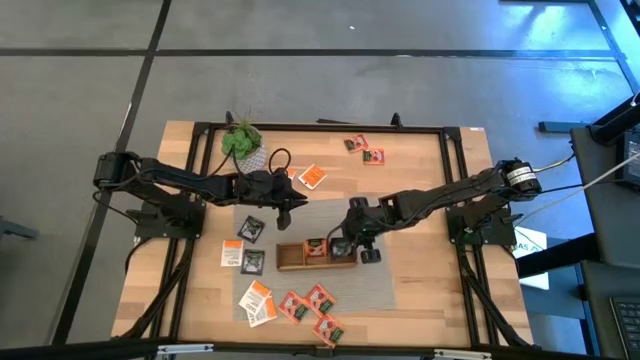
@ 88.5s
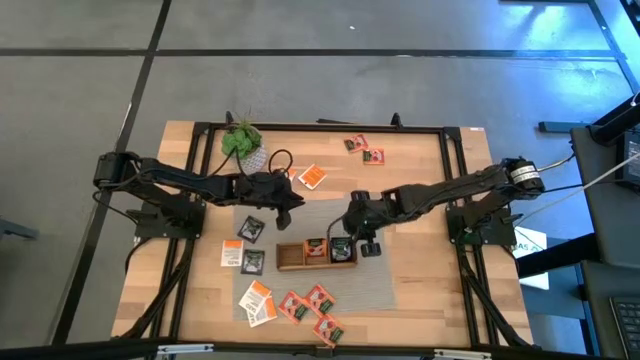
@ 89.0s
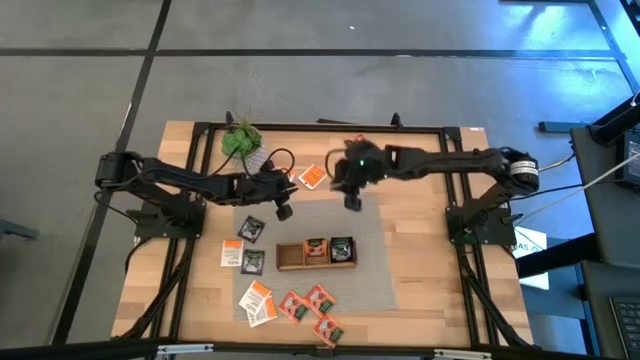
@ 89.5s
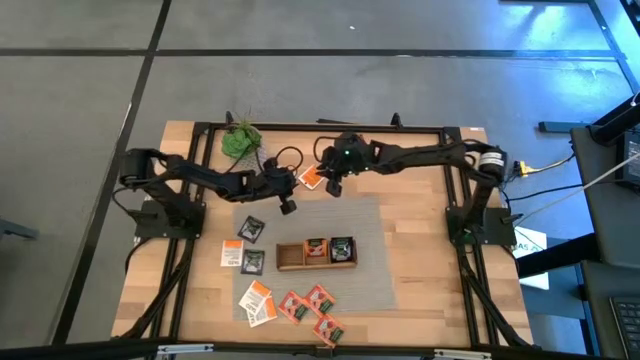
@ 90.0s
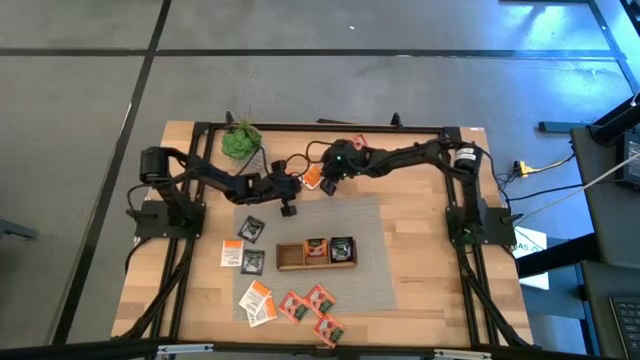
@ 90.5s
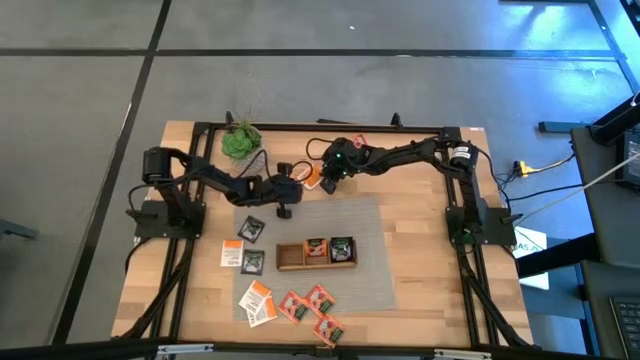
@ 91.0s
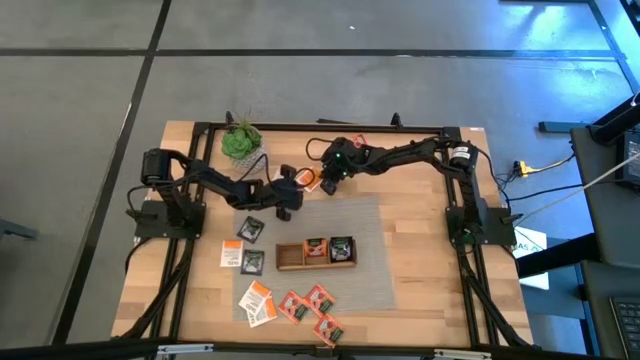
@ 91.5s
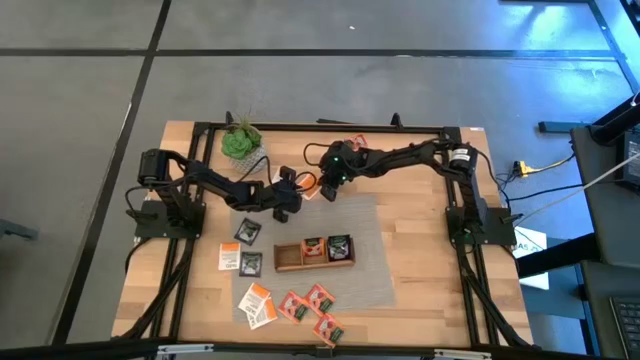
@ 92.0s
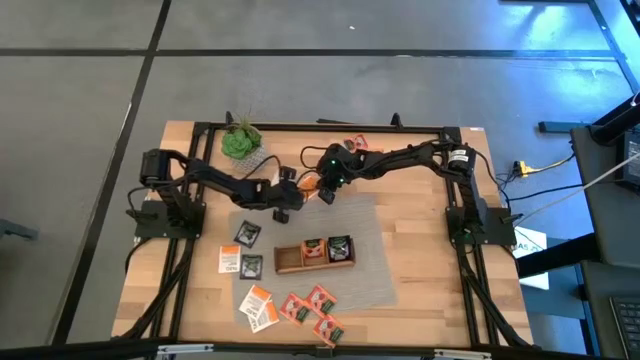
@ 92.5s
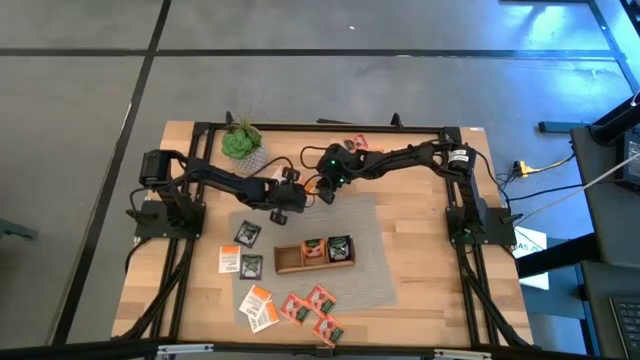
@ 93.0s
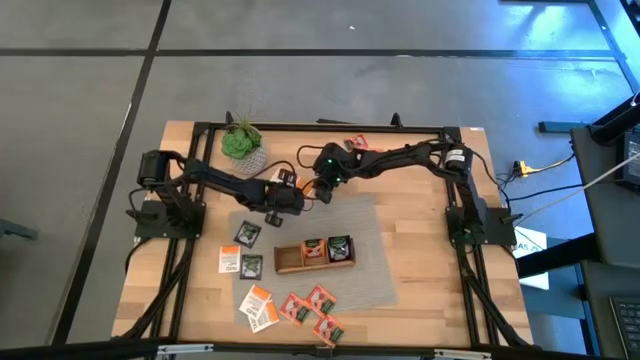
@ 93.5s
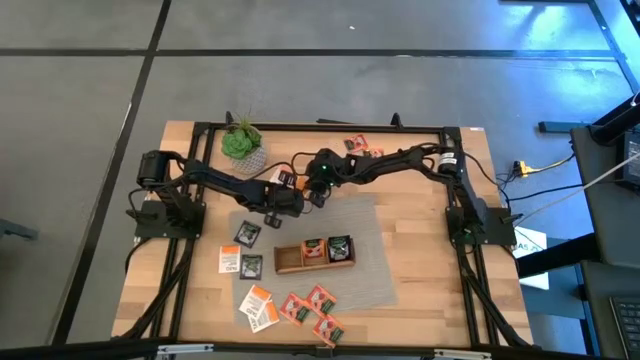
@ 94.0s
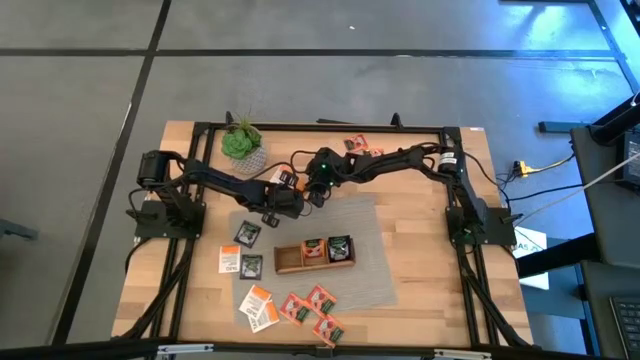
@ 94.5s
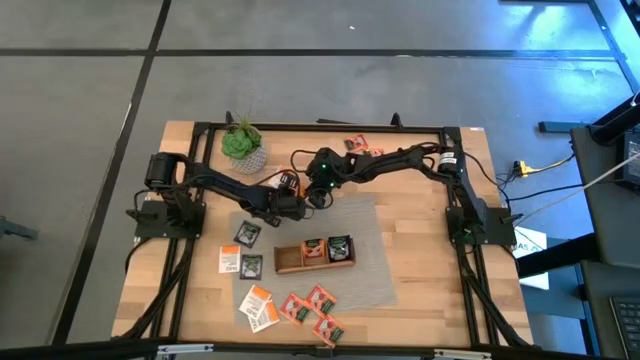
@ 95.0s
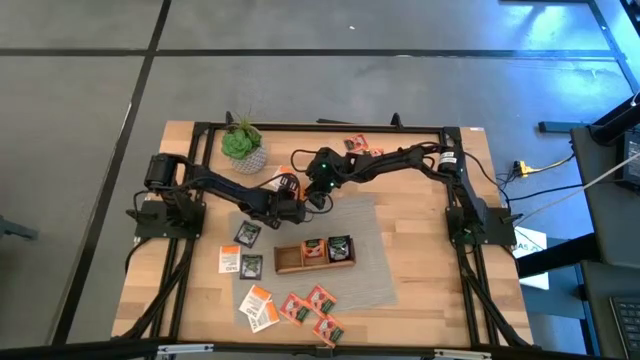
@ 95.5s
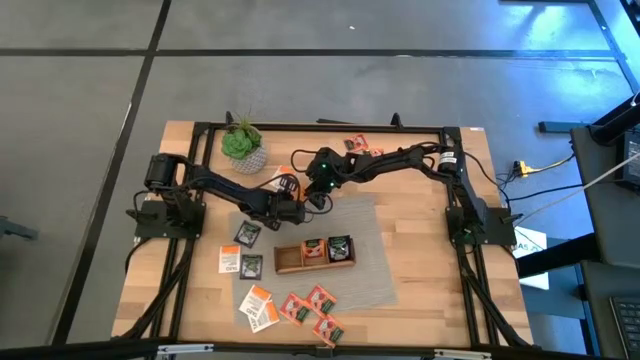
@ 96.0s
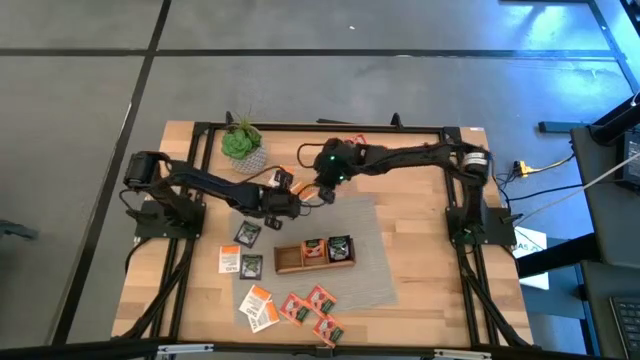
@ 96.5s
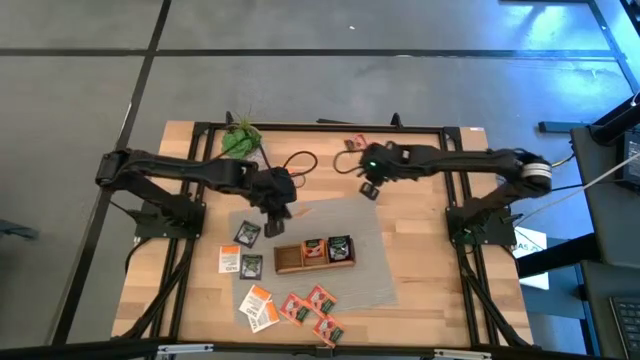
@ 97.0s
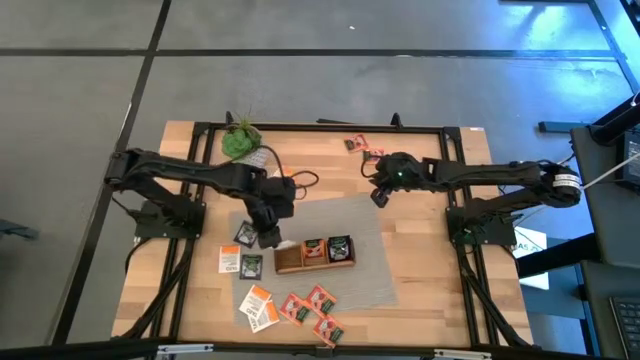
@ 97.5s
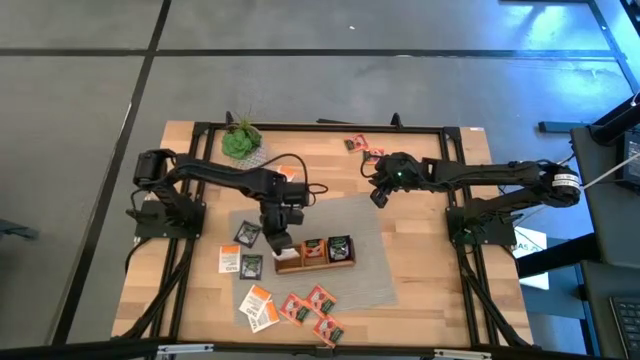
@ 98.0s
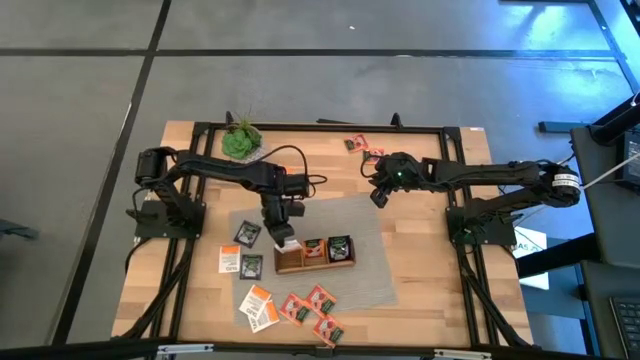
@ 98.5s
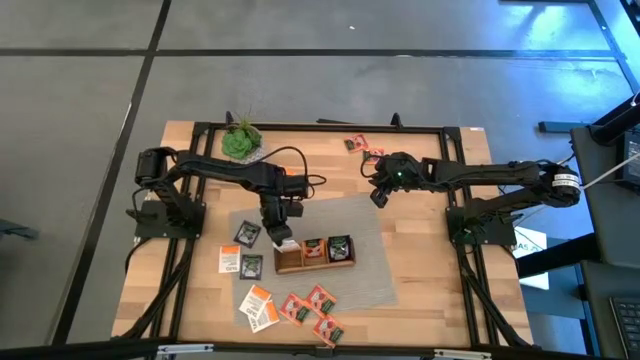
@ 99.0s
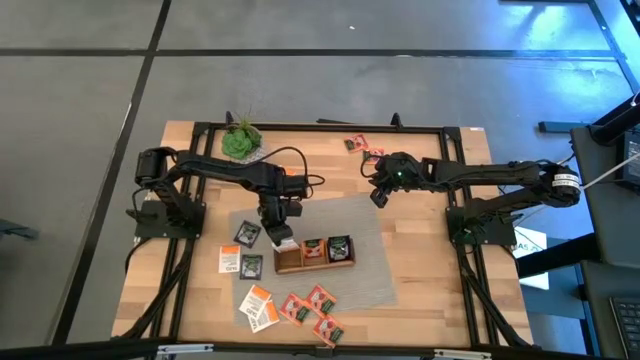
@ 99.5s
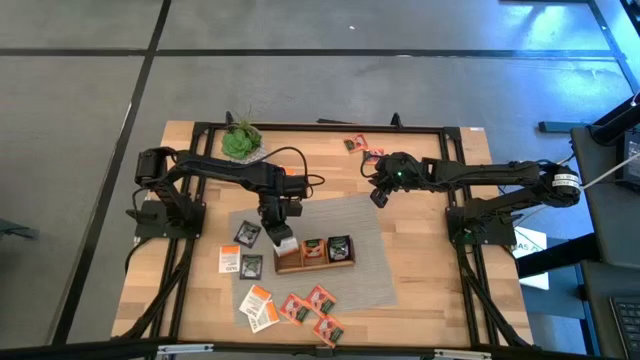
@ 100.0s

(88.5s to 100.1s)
Task: Pick & Place Tea
Put the white tea bag into the left section of the wooden organizer

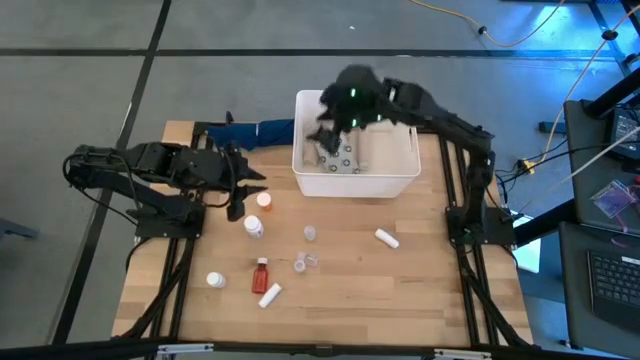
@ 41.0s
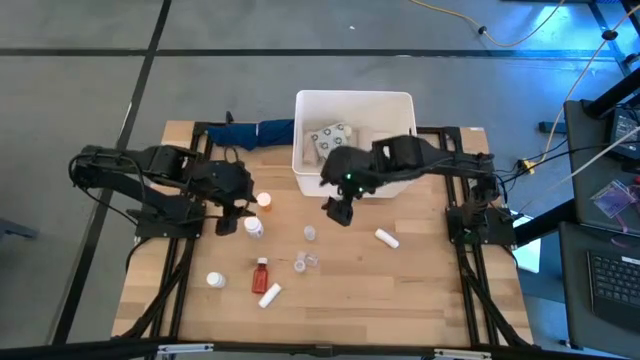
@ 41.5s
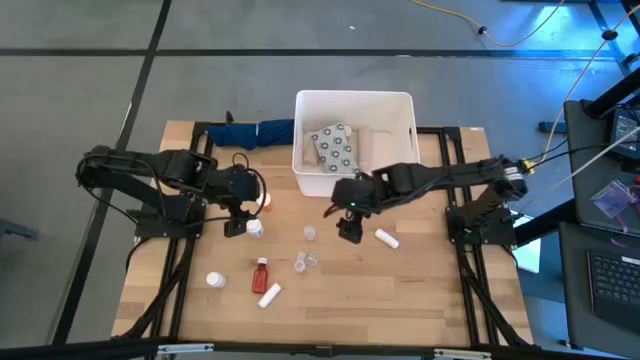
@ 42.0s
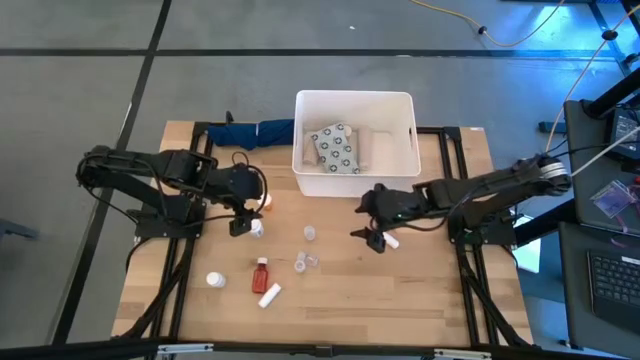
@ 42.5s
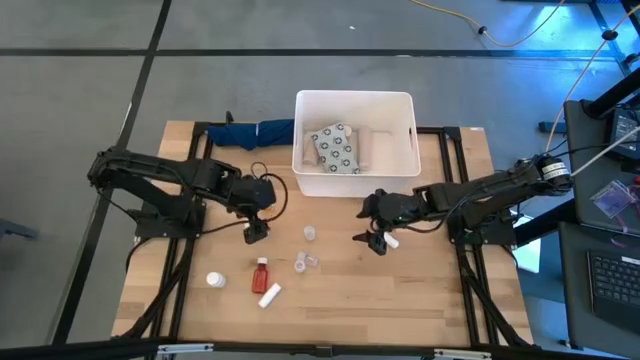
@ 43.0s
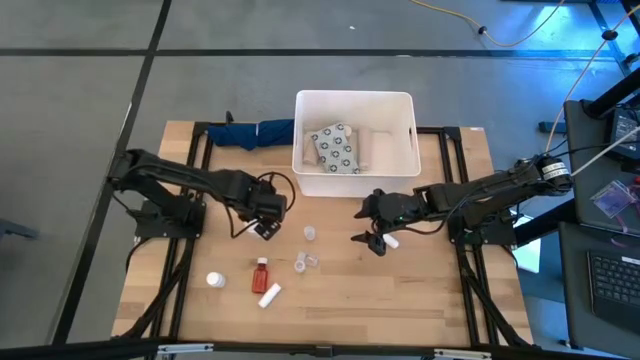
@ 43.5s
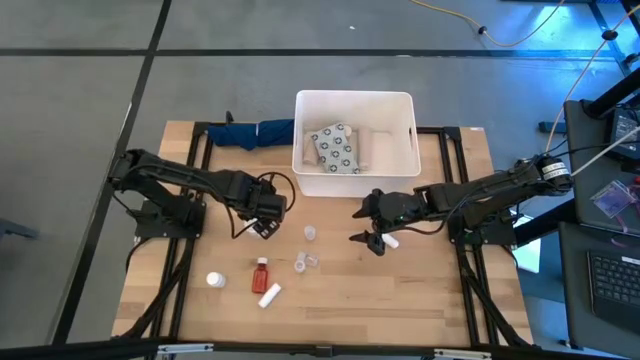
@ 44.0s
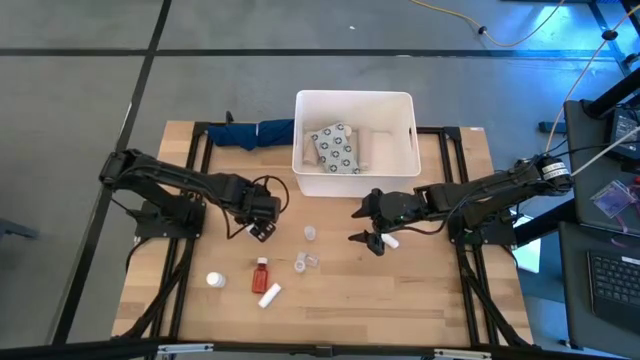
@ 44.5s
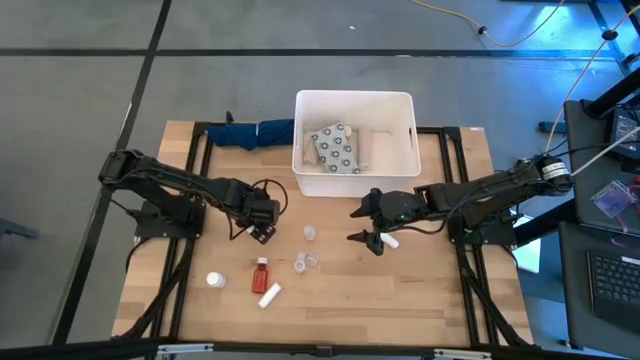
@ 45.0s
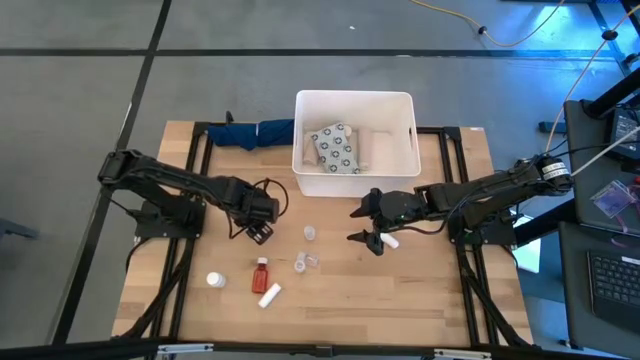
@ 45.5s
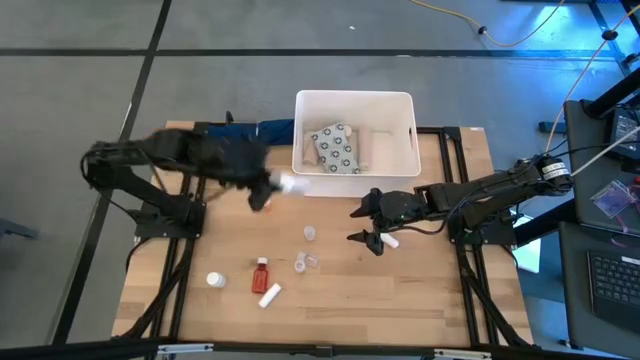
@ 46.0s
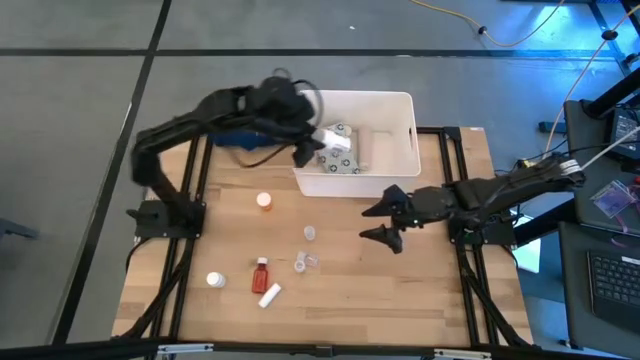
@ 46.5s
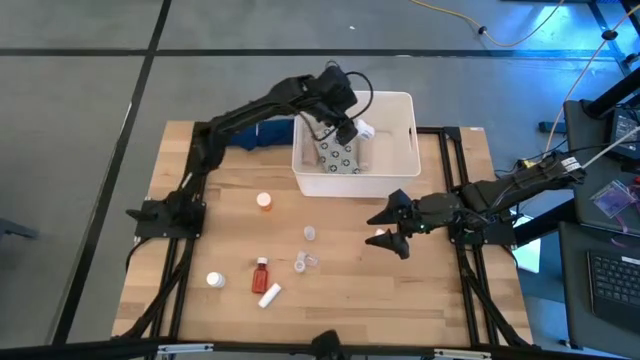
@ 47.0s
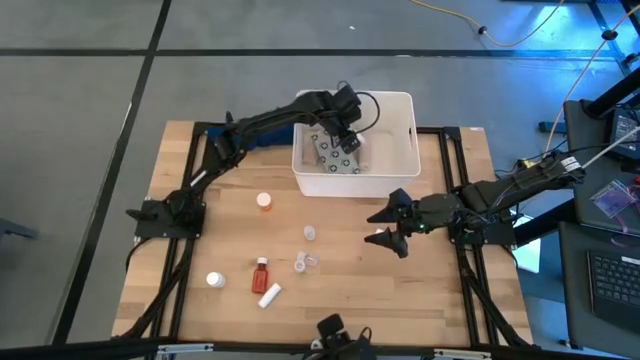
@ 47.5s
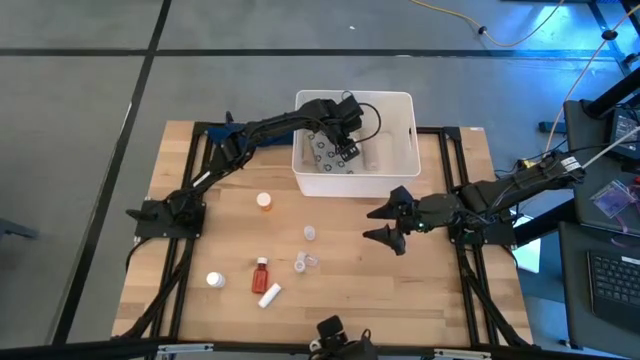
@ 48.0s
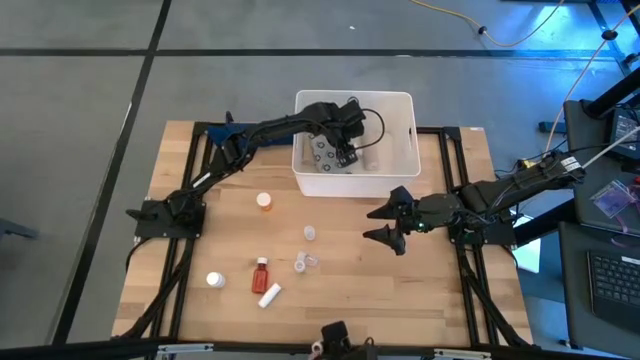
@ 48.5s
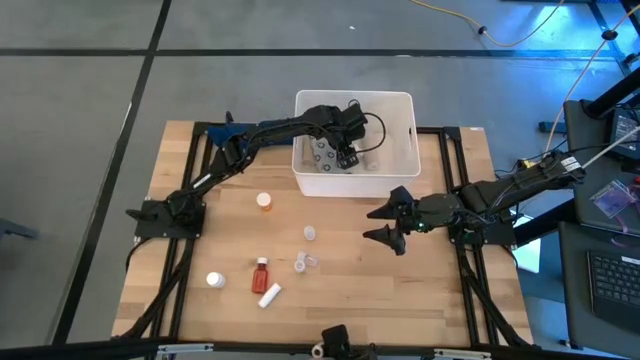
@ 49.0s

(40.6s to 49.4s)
Task: Pick & place medical supplies in basket/bin
Put the top white pill bottle into the white bin
